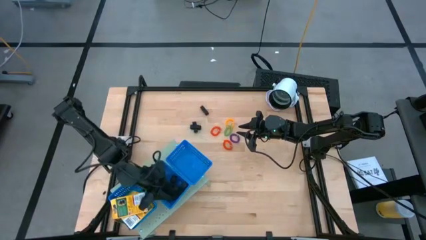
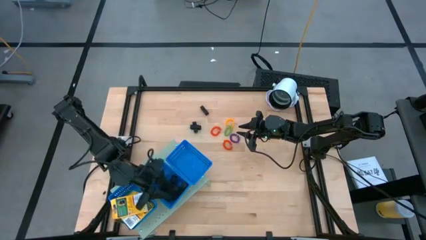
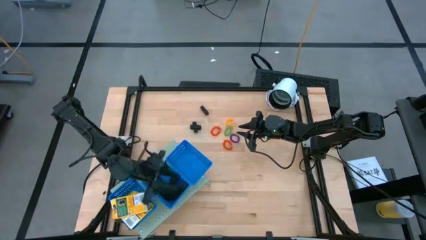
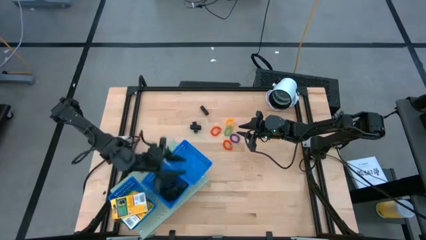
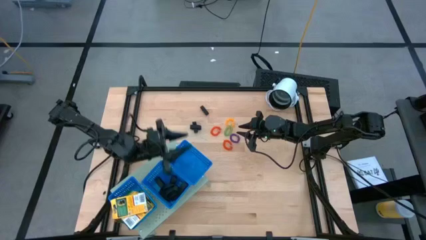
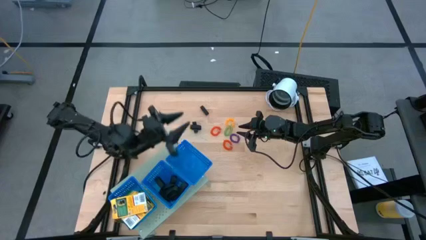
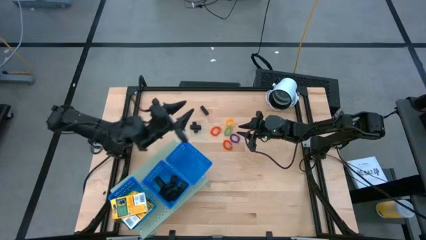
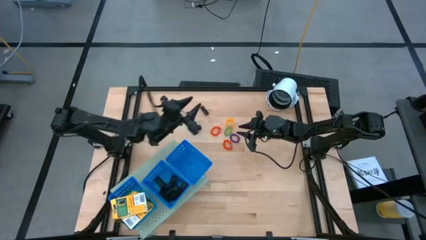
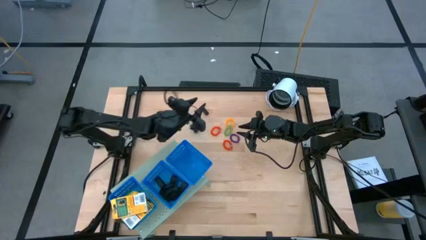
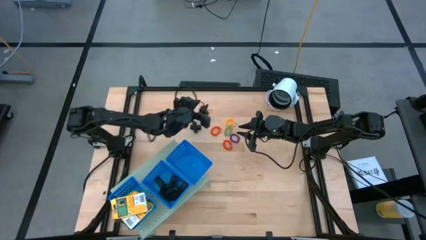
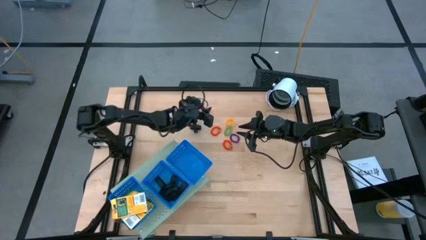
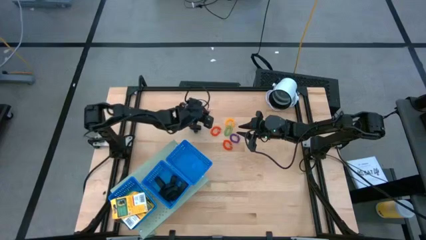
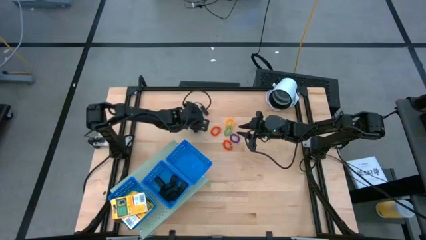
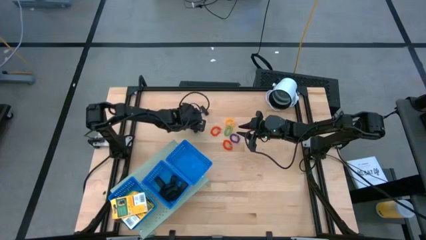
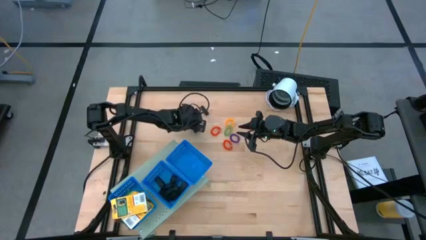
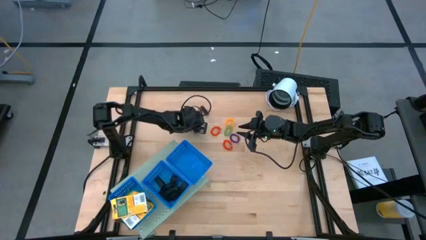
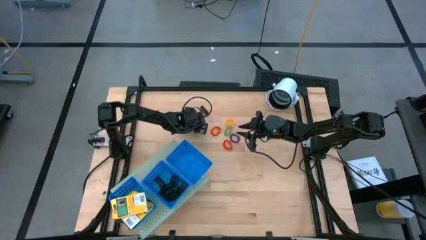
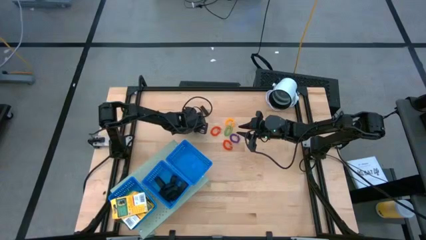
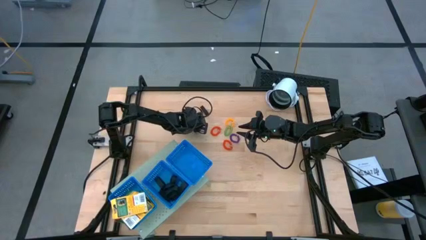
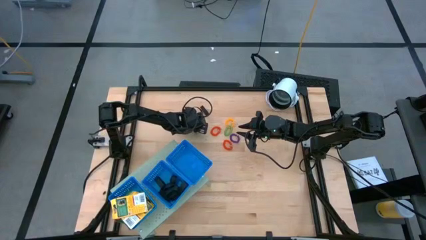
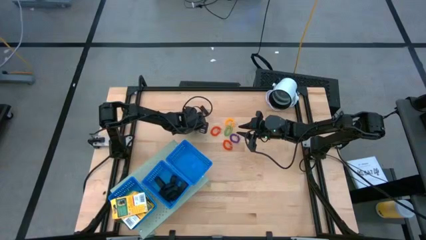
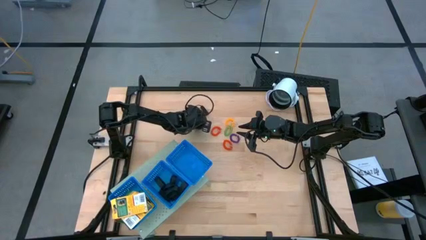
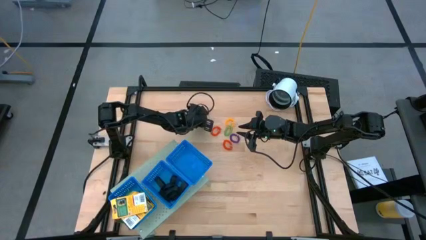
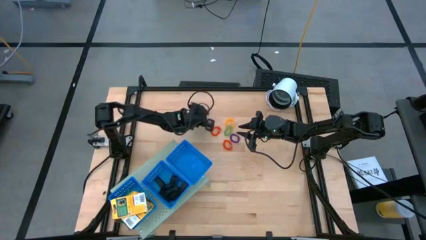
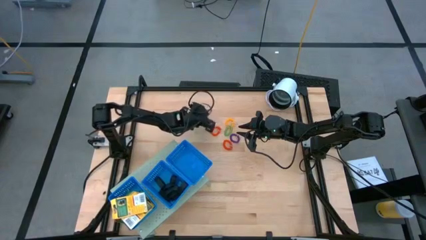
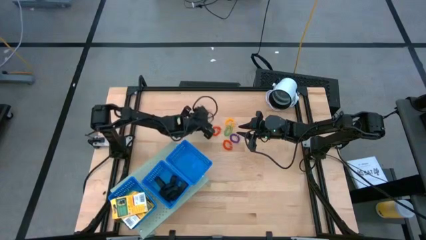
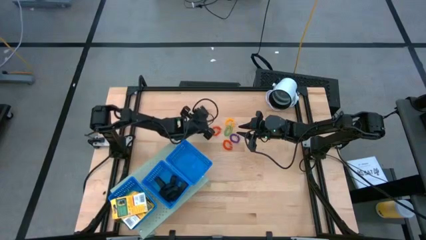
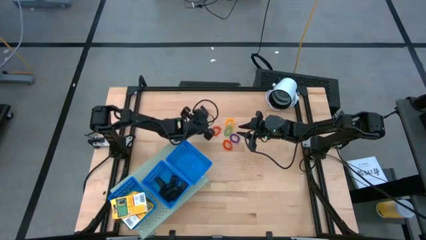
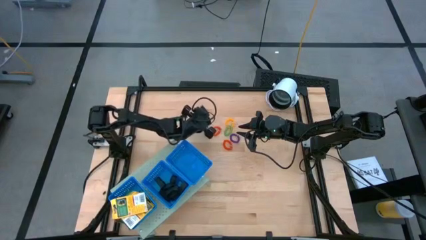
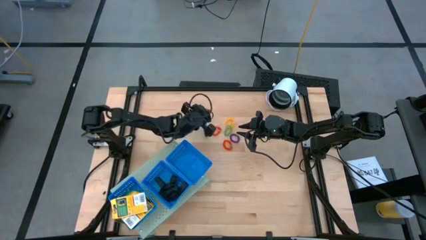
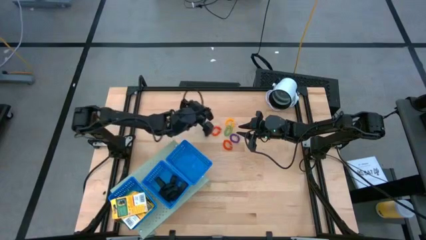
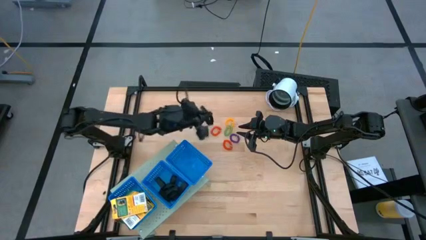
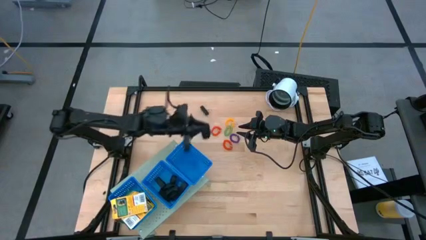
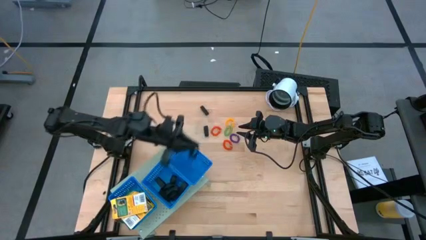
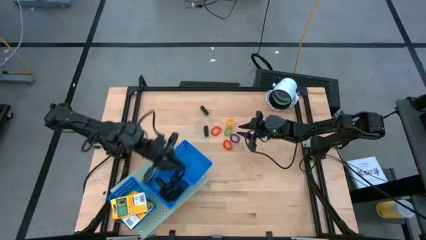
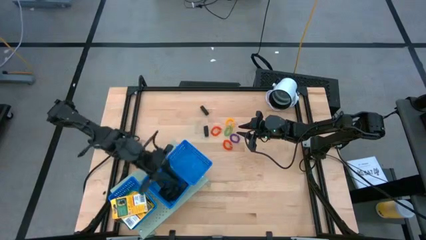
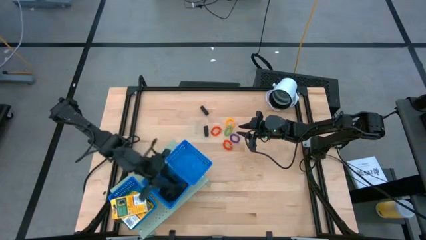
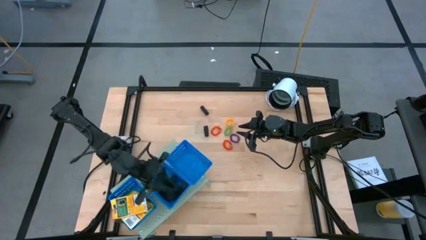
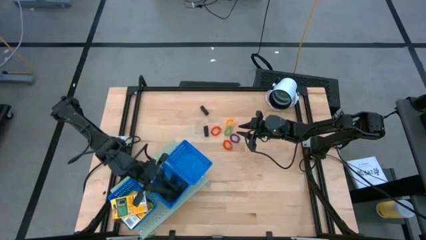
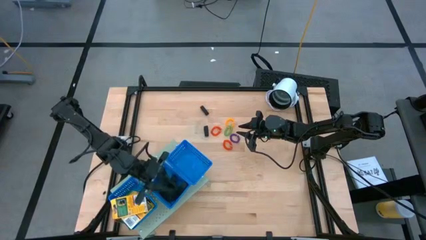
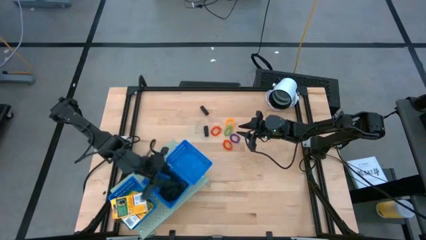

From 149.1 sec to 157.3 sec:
Task: Pick & Place Office Desk Supplies
Put the black rubber band into the center blue basket on the shelf

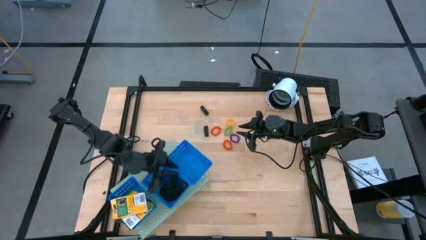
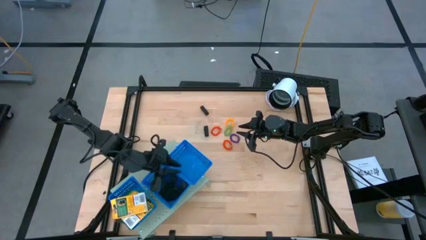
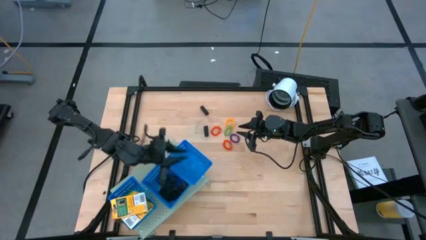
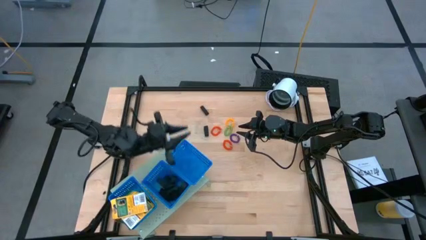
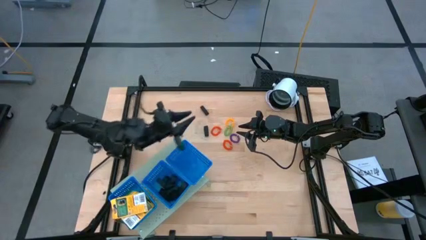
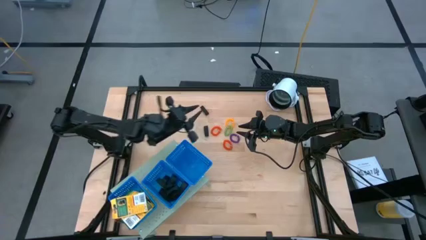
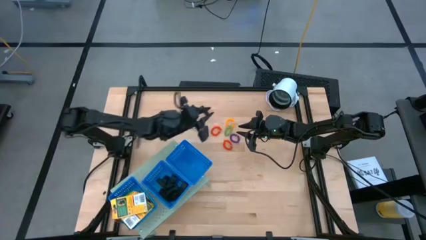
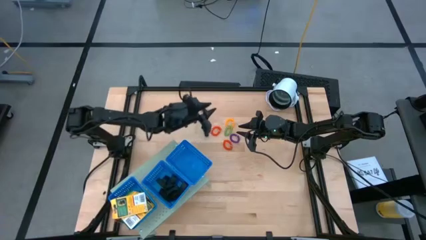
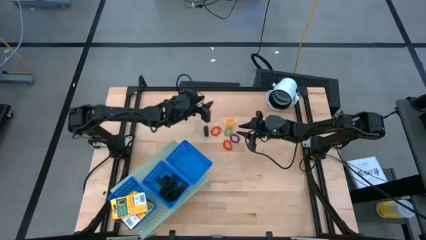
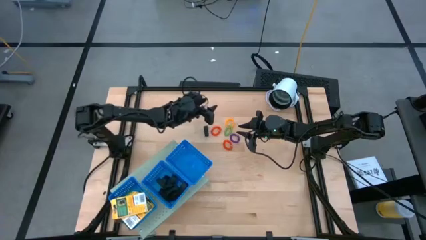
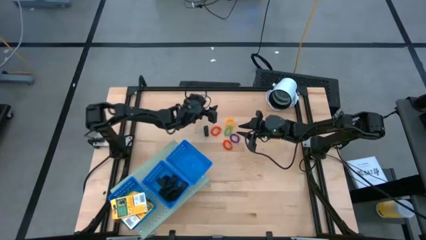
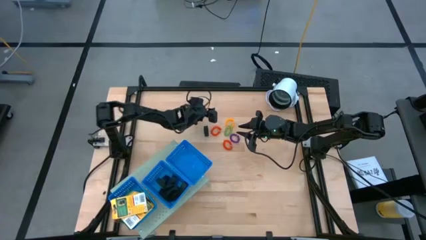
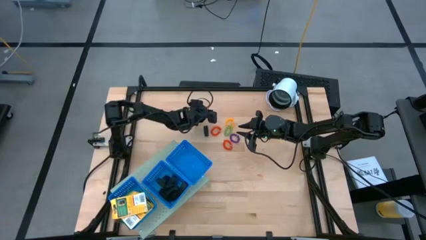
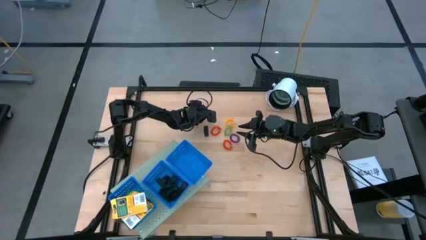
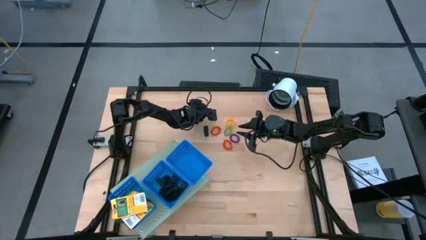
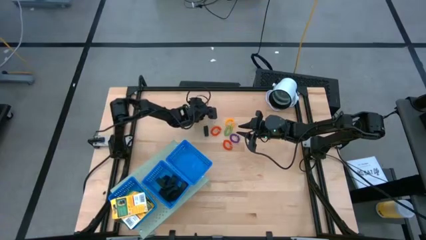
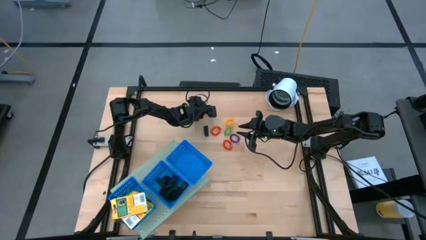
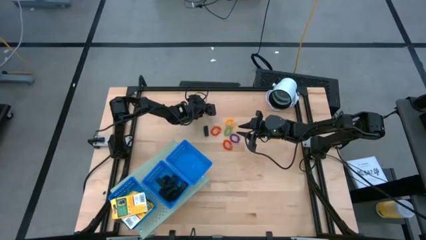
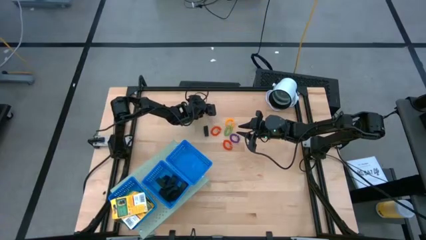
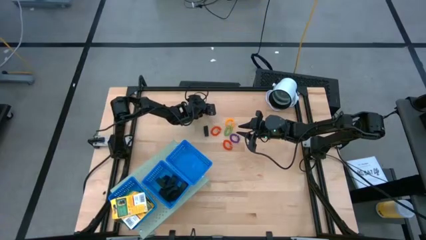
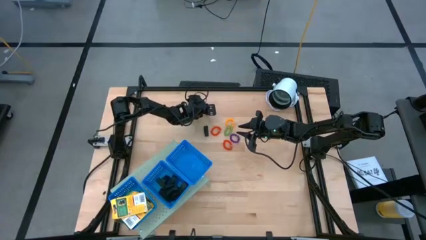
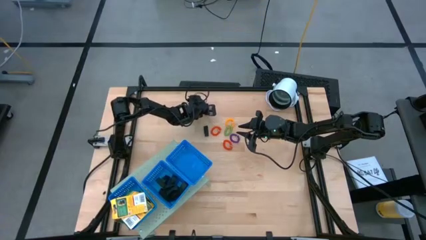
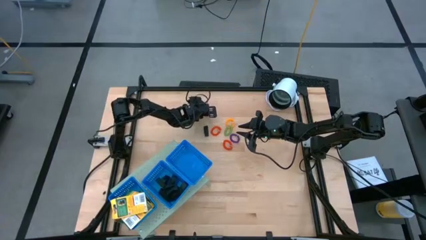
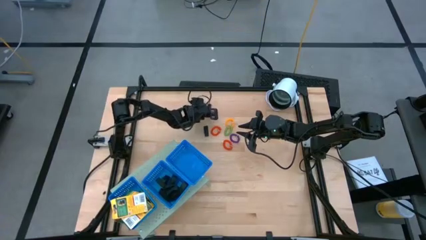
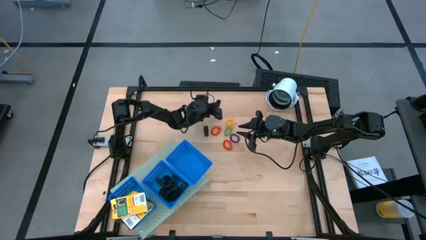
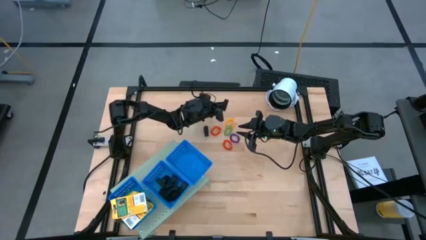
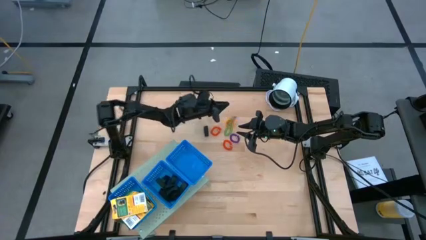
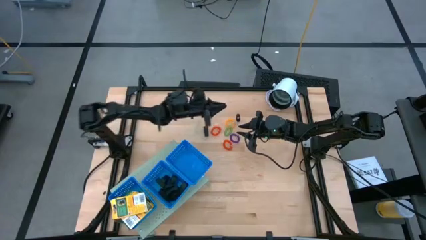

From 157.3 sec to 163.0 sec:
Put the black rubber band into the center blue basket on the shelf
